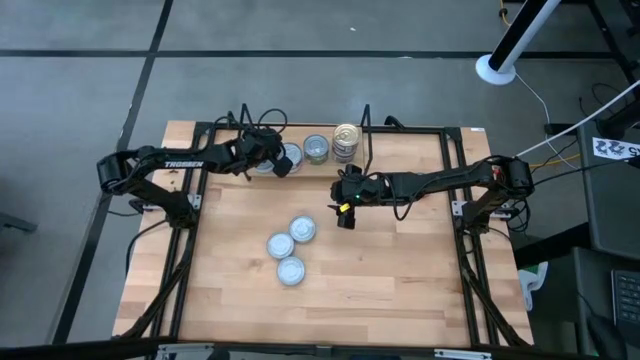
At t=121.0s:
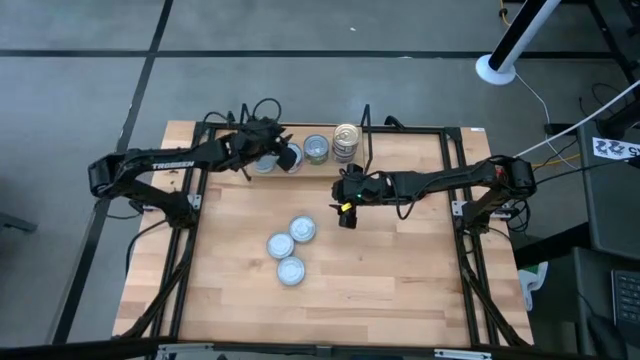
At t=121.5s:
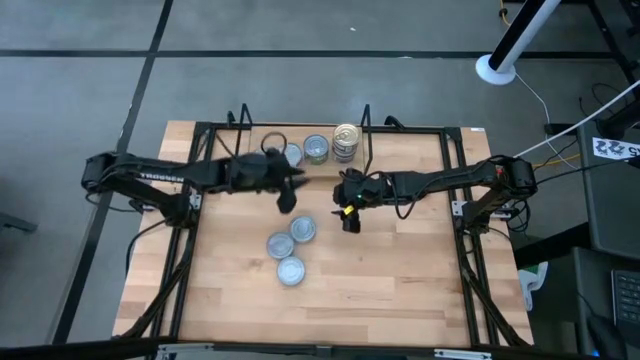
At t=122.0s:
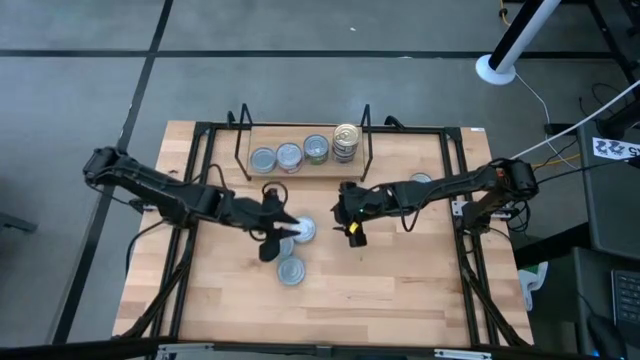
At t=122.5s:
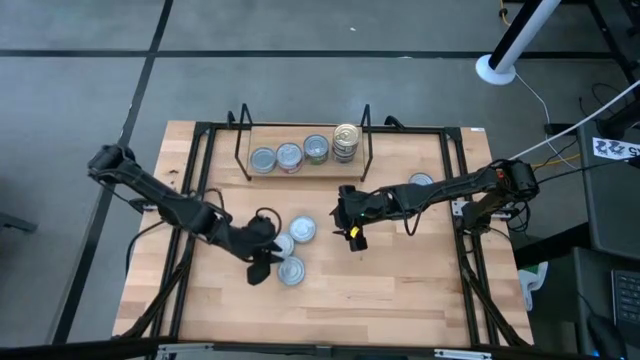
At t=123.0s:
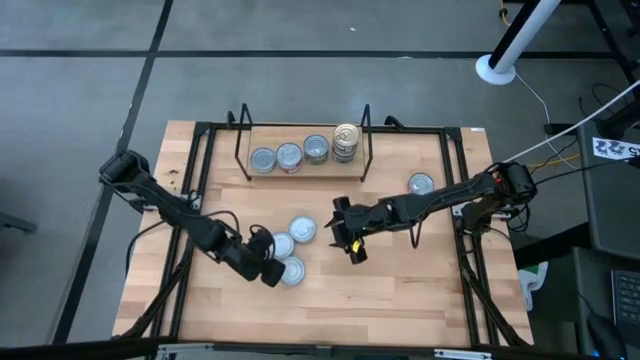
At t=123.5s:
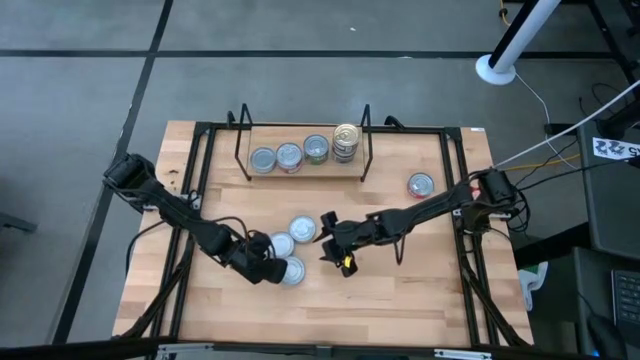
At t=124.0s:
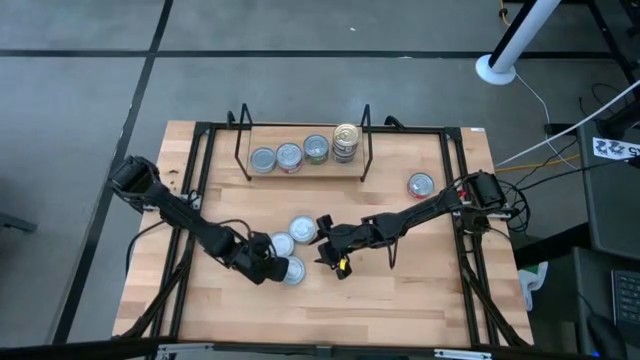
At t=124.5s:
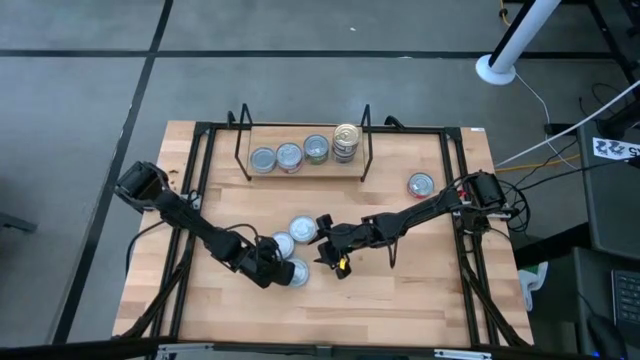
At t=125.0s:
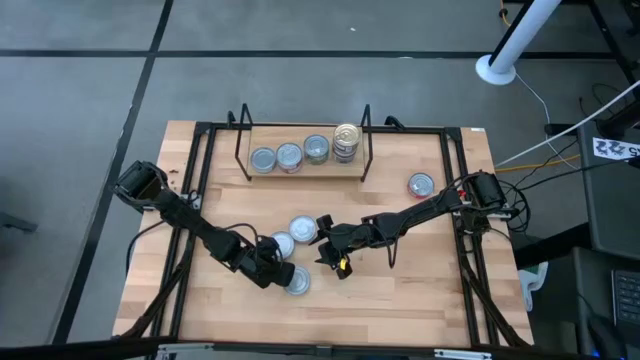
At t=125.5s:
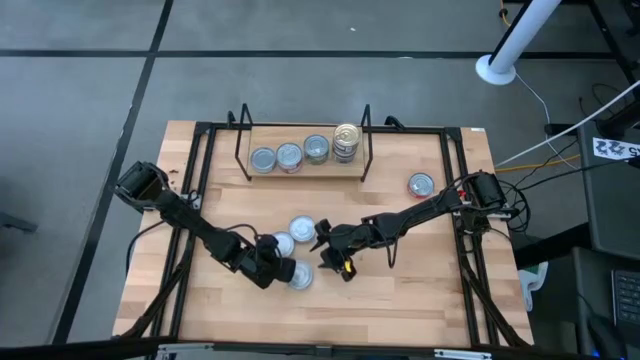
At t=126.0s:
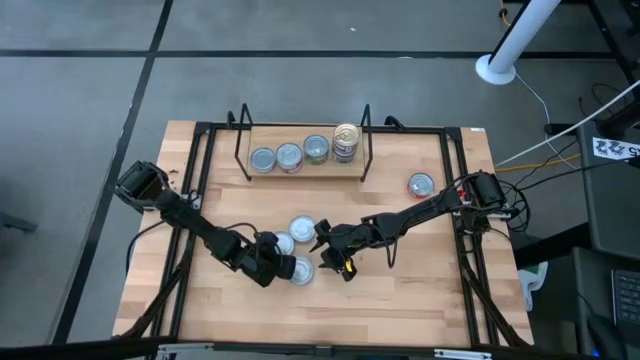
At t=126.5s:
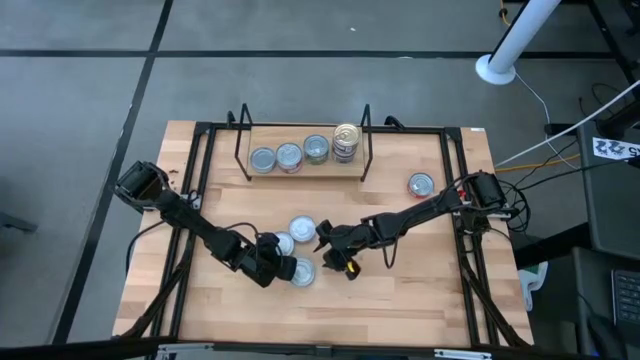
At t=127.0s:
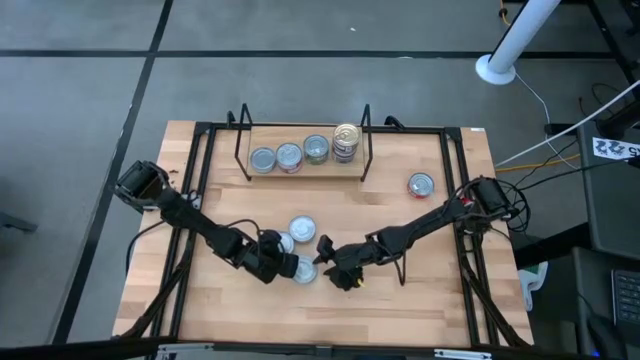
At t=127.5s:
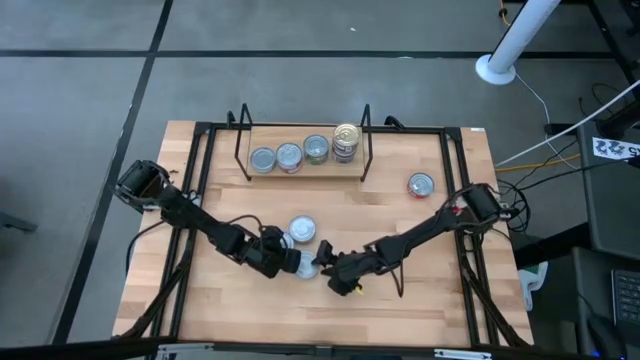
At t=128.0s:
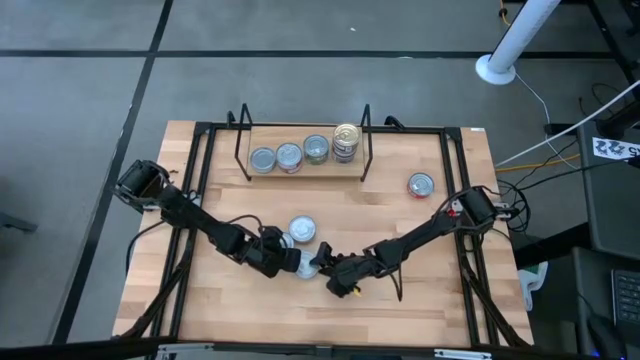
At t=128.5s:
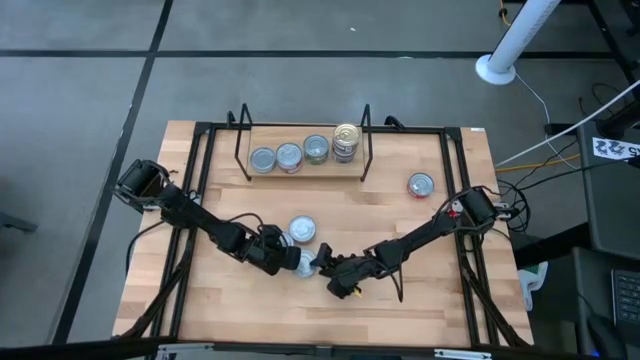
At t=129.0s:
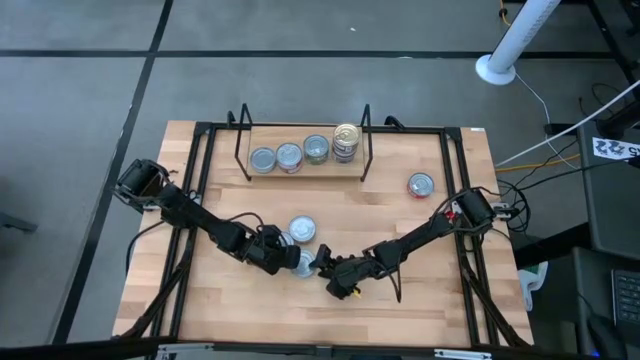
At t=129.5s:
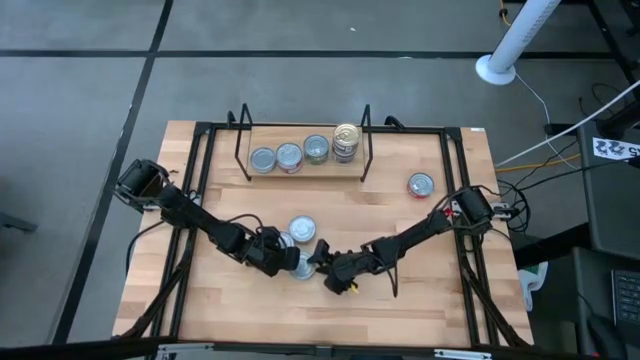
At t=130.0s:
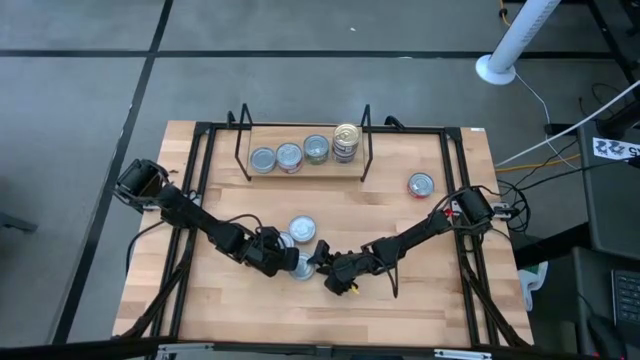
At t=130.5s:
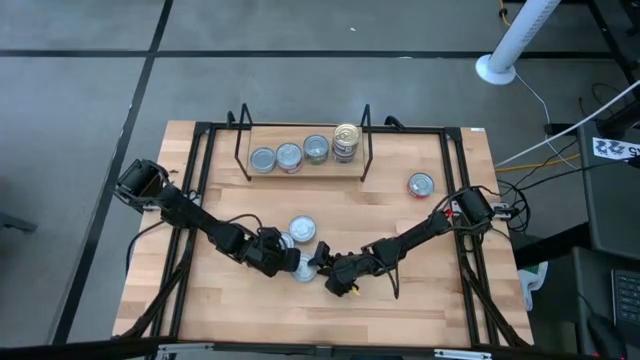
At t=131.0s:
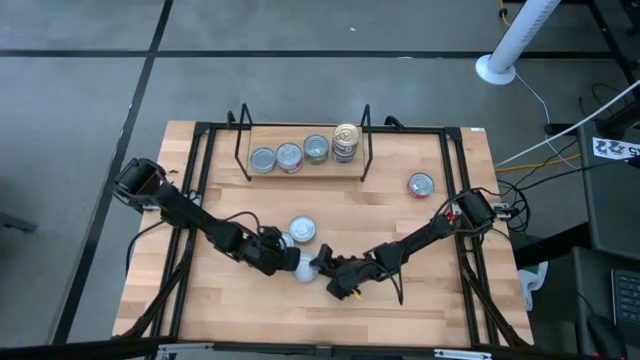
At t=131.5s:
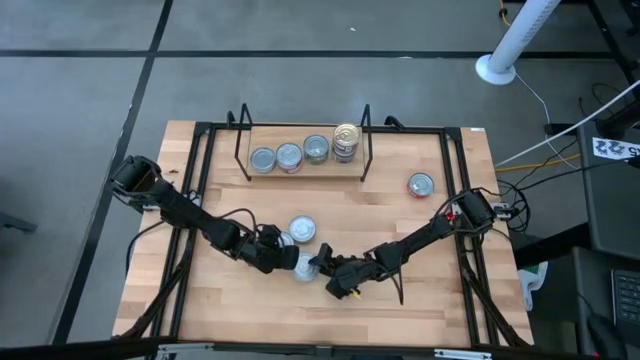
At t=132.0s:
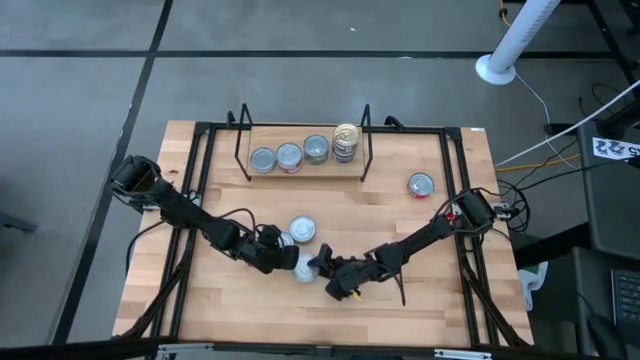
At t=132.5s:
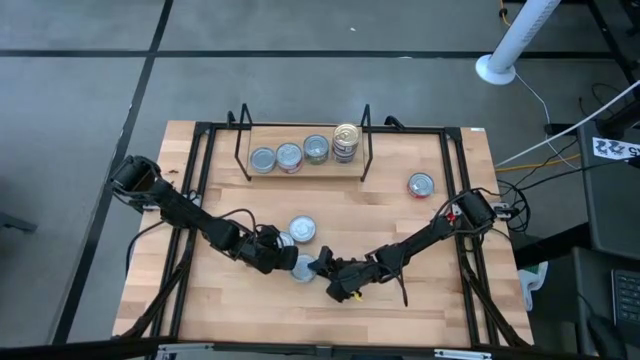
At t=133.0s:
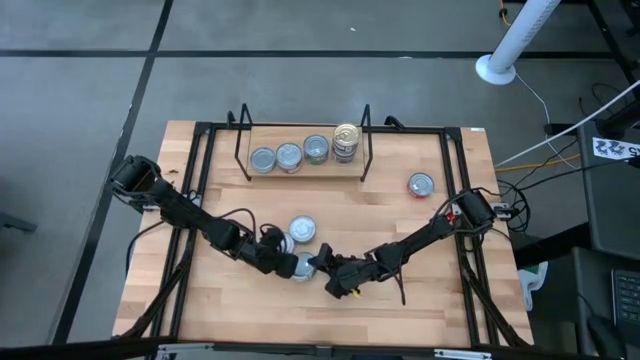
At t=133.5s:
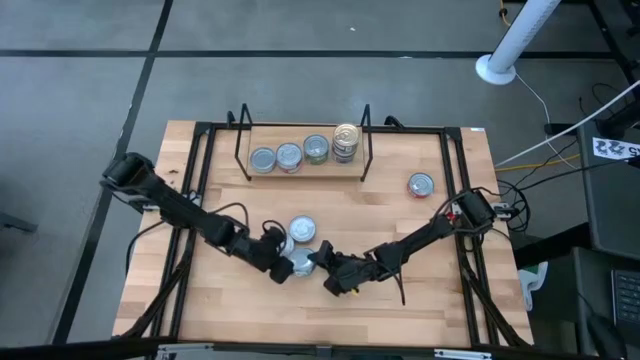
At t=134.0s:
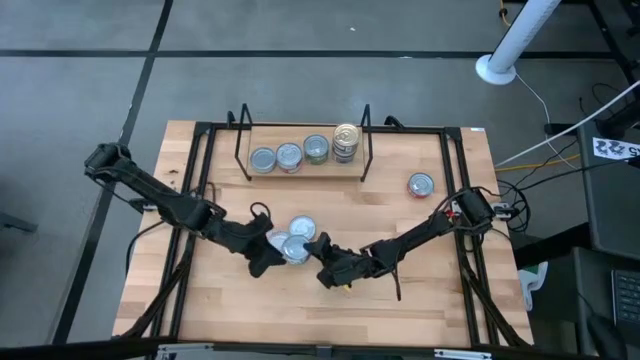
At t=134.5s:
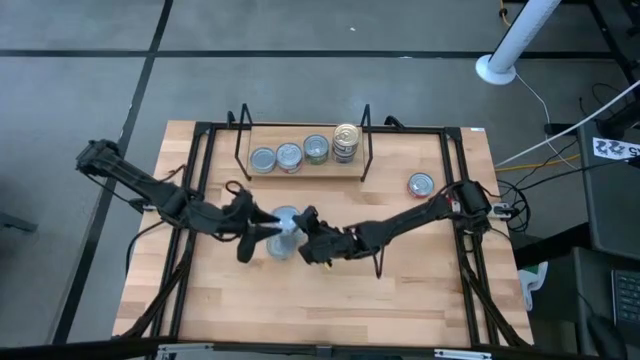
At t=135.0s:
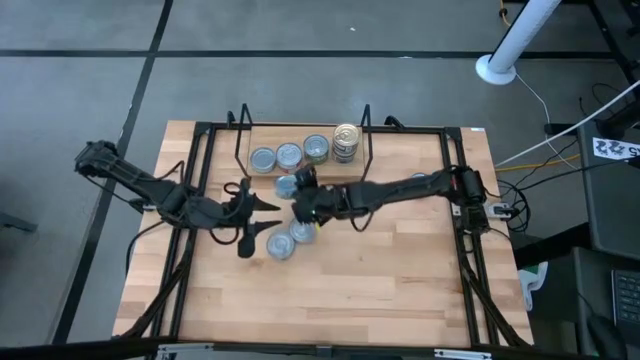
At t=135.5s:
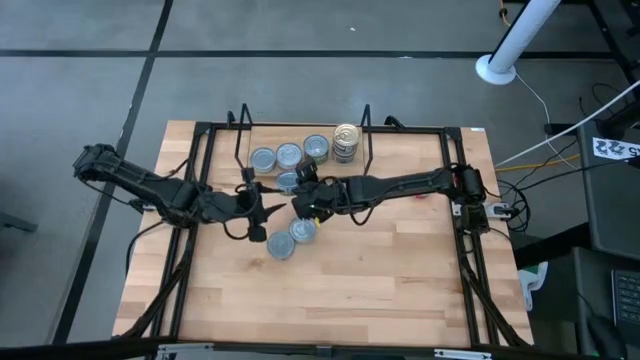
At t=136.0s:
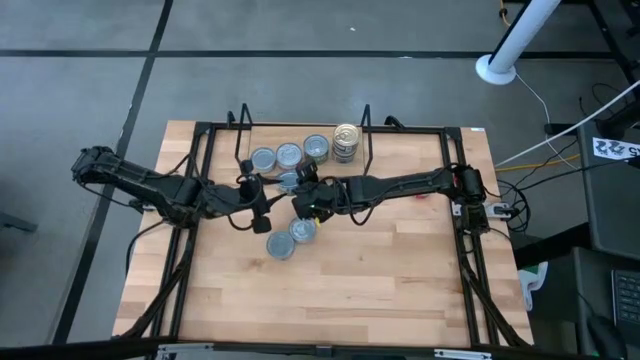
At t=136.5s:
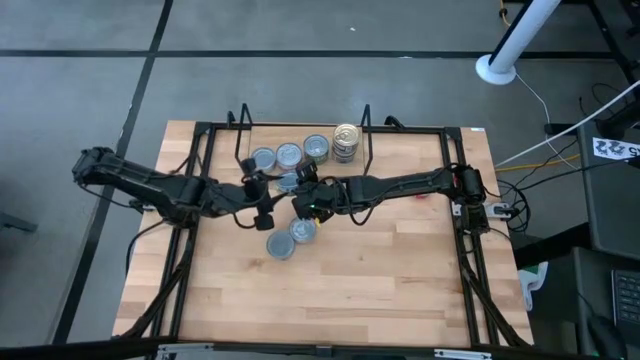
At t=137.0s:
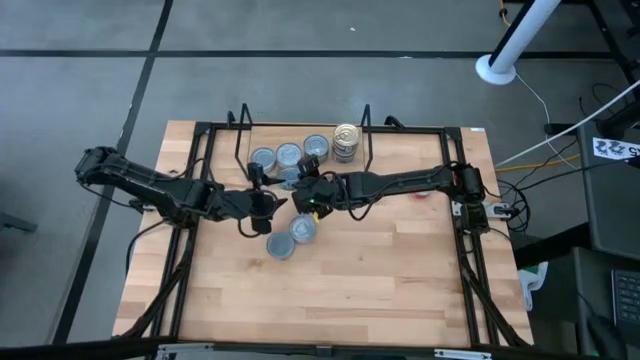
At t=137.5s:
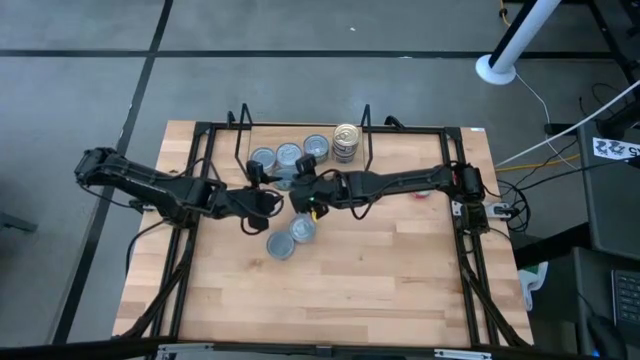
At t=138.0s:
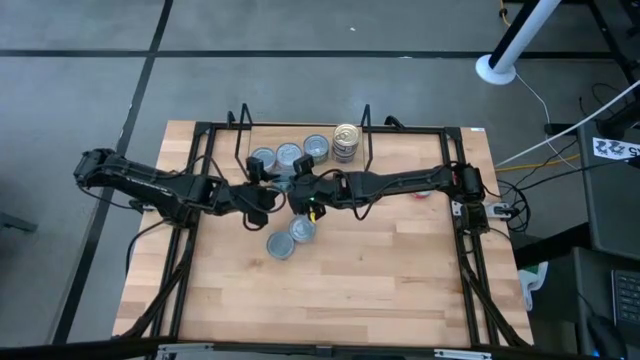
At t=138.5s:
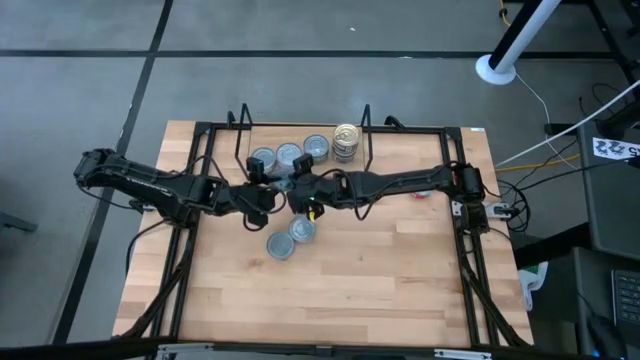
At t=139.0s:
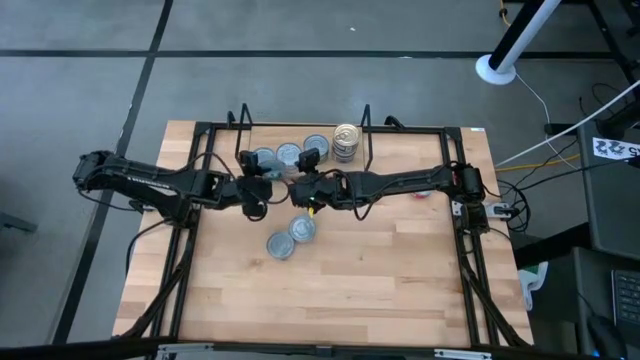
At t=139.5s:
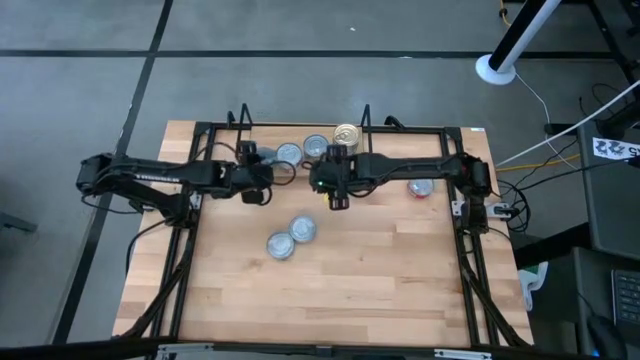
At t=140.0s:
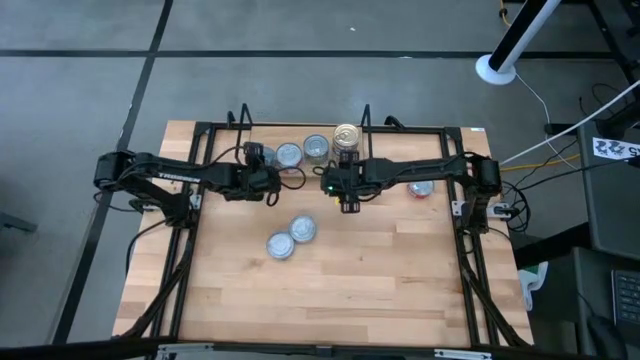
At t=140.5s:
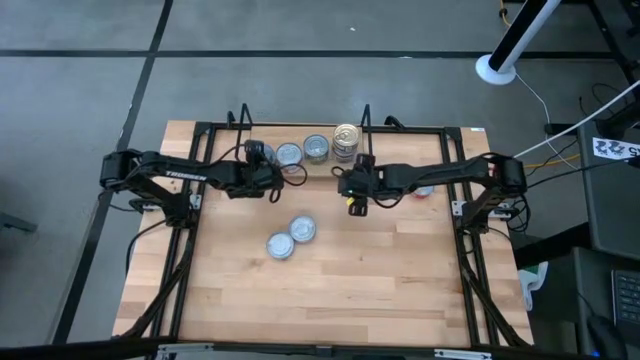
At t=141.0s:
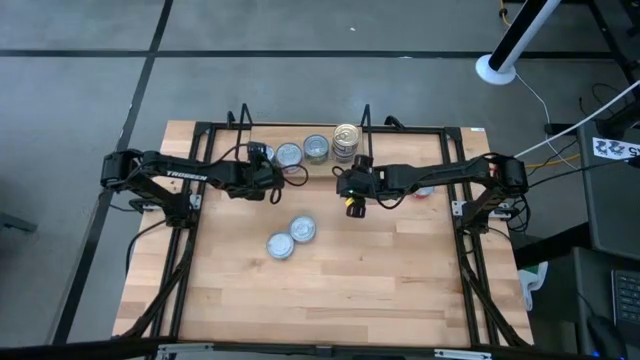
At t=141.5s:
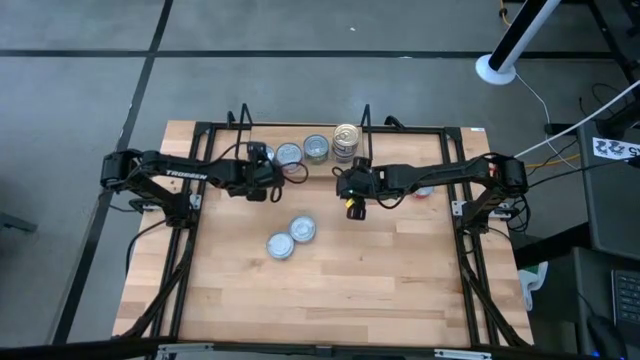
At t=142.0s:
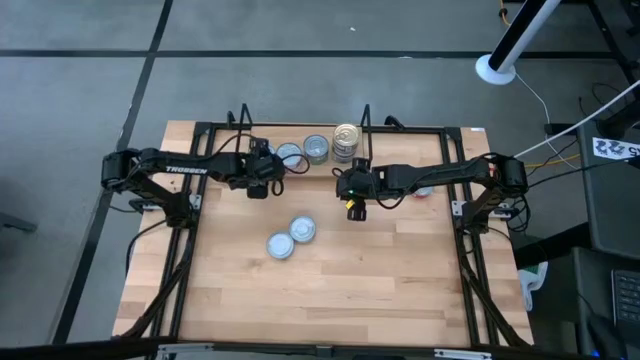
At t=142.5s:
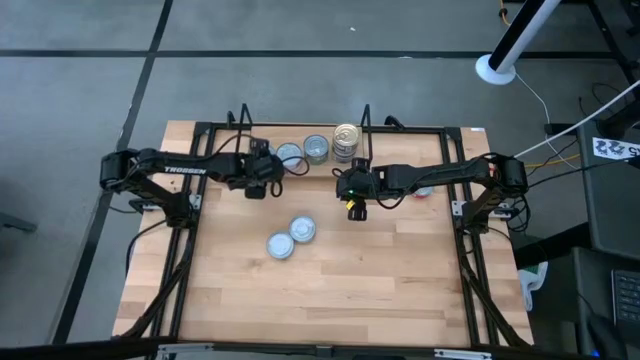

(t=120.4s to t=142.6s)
Task: Stack canned seafood by type on shelf
Stack the green-white tuna can on top of the green-white tuna can on the shelf
